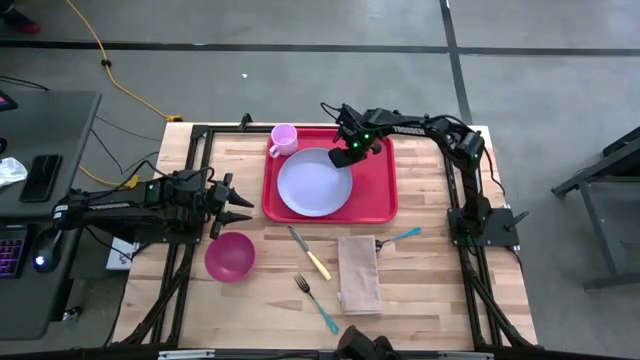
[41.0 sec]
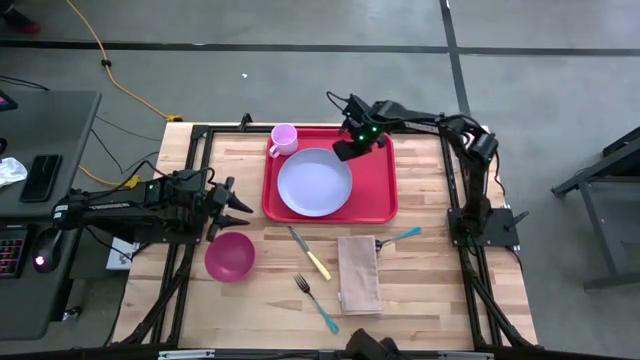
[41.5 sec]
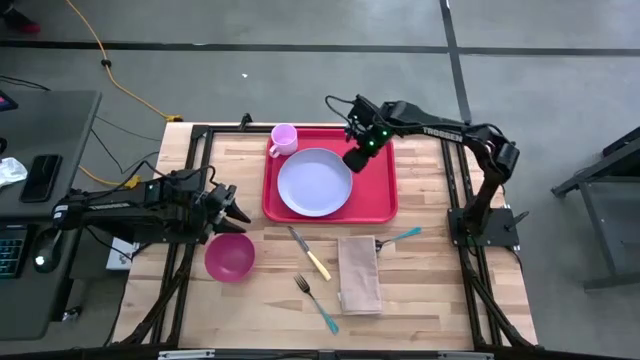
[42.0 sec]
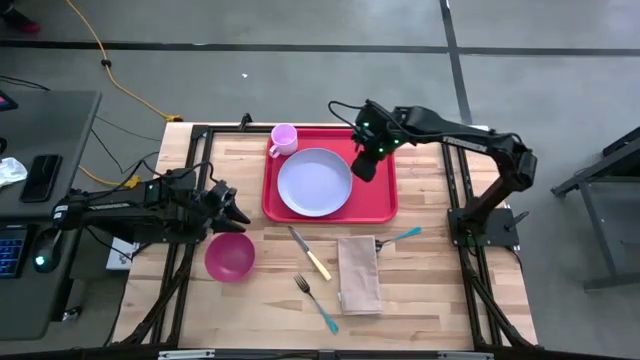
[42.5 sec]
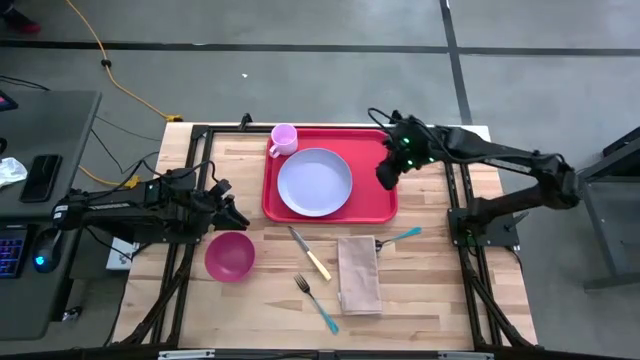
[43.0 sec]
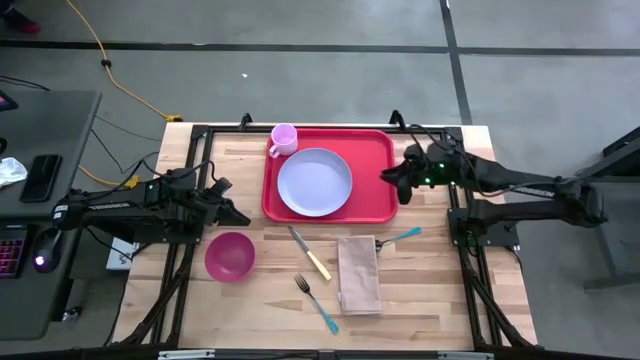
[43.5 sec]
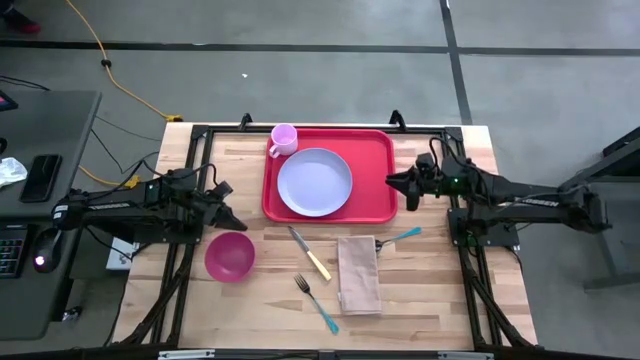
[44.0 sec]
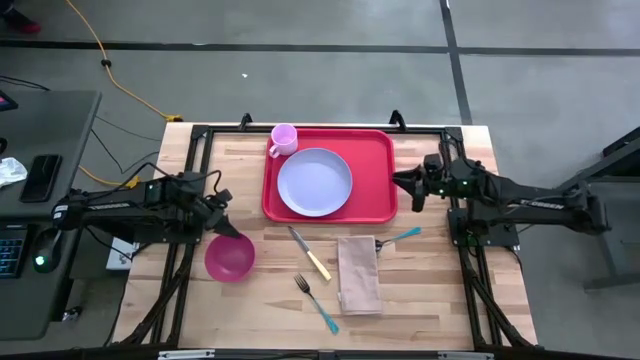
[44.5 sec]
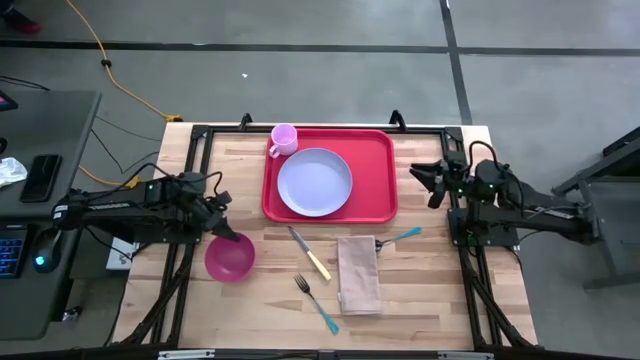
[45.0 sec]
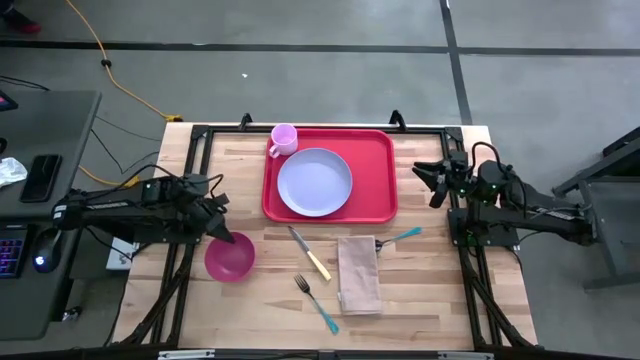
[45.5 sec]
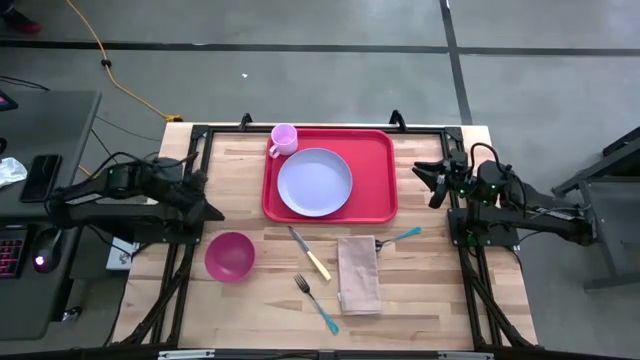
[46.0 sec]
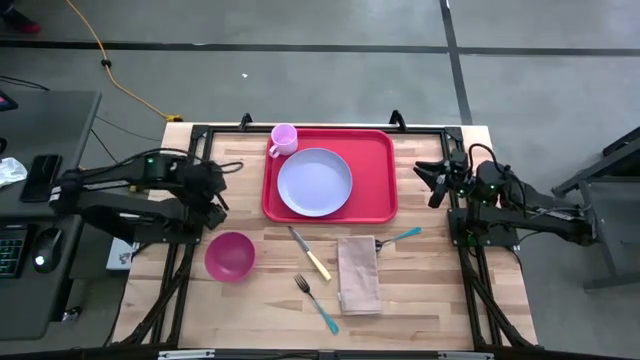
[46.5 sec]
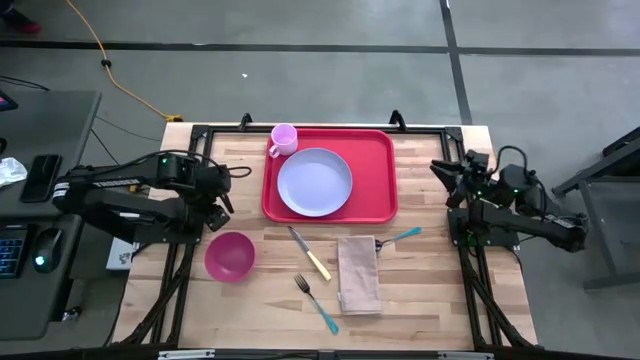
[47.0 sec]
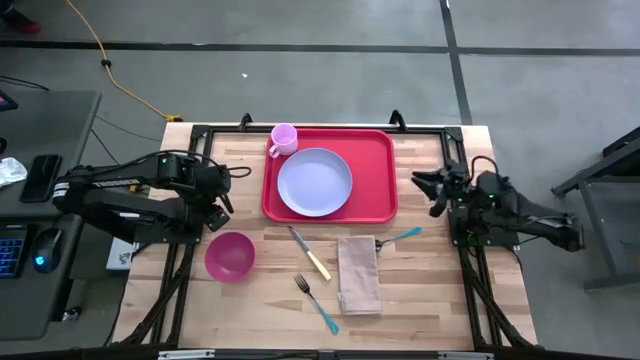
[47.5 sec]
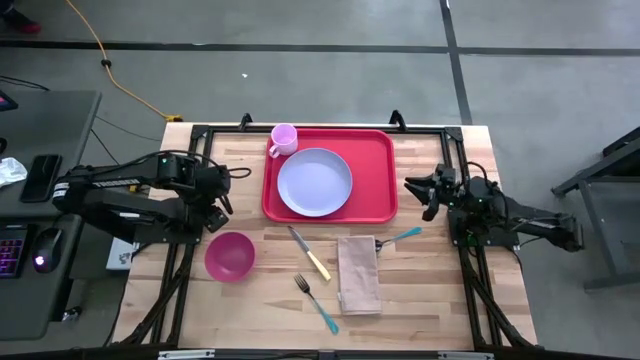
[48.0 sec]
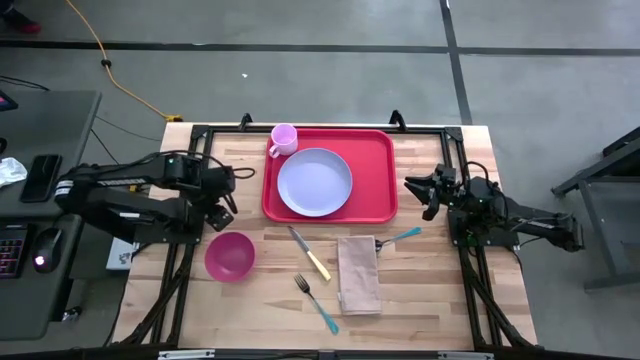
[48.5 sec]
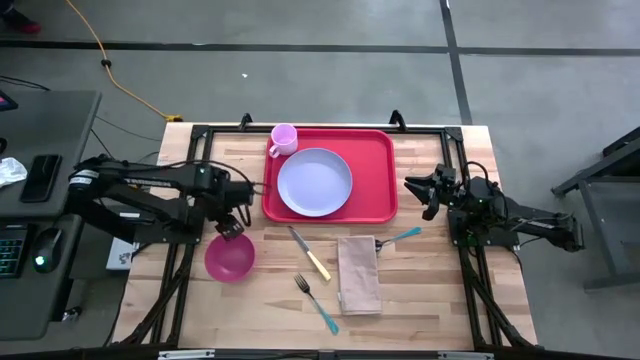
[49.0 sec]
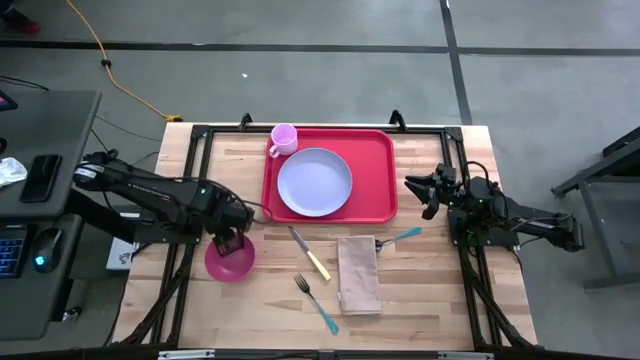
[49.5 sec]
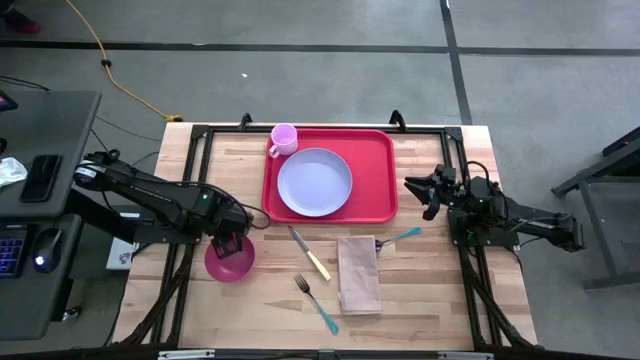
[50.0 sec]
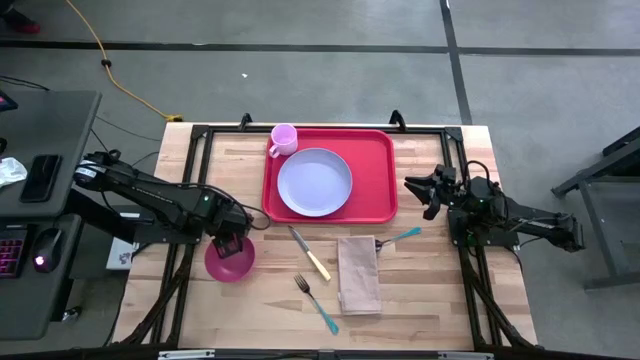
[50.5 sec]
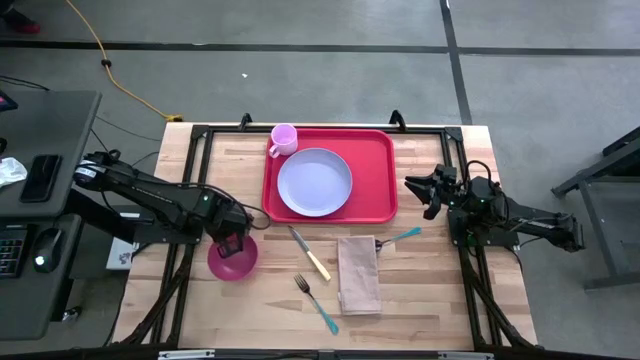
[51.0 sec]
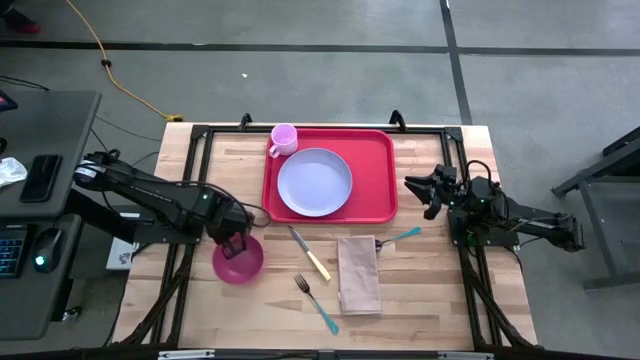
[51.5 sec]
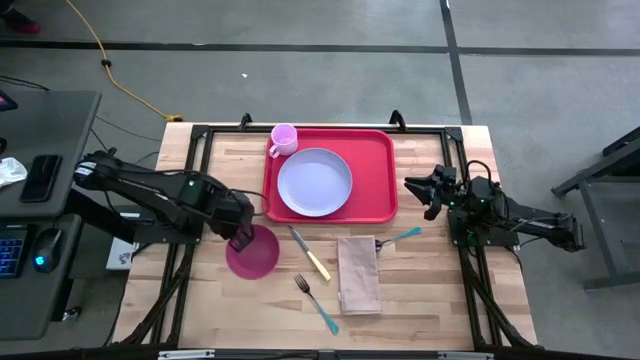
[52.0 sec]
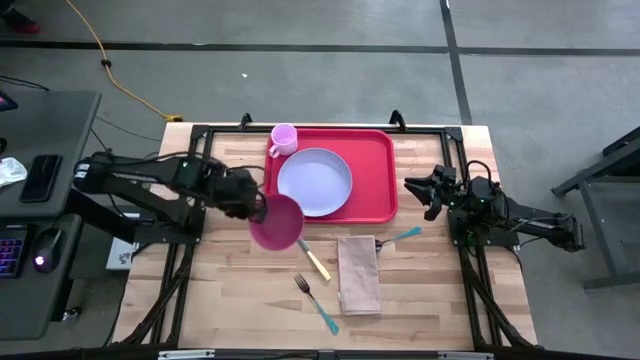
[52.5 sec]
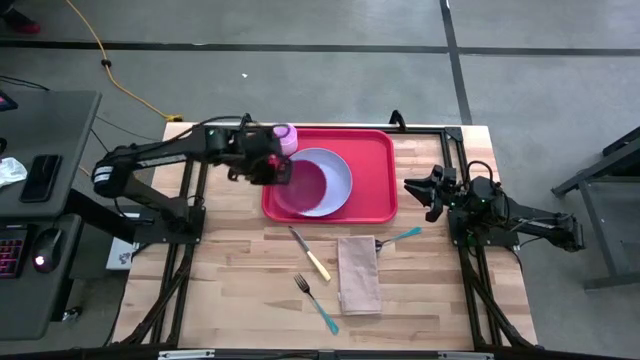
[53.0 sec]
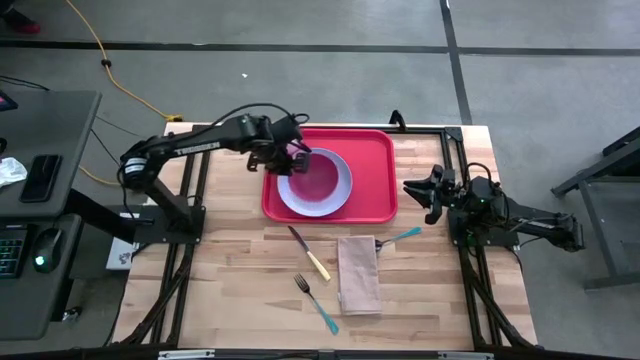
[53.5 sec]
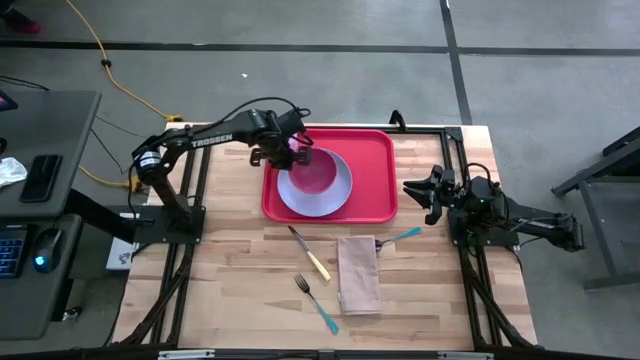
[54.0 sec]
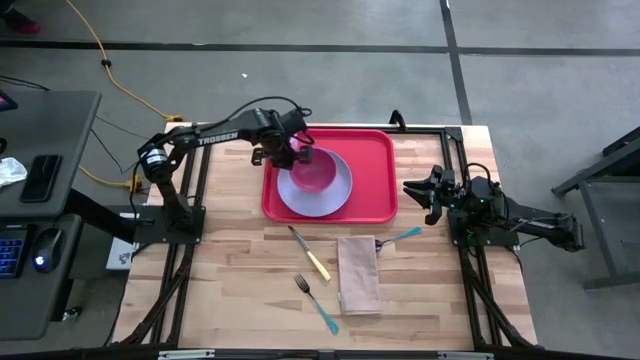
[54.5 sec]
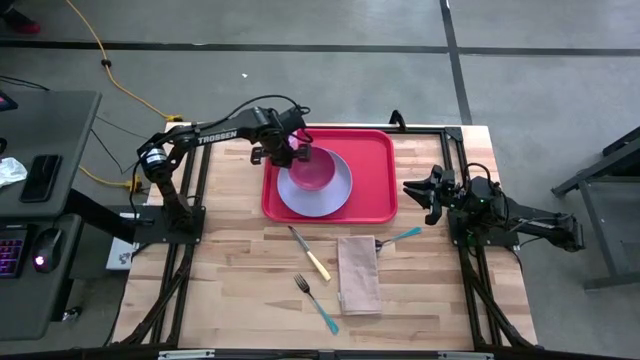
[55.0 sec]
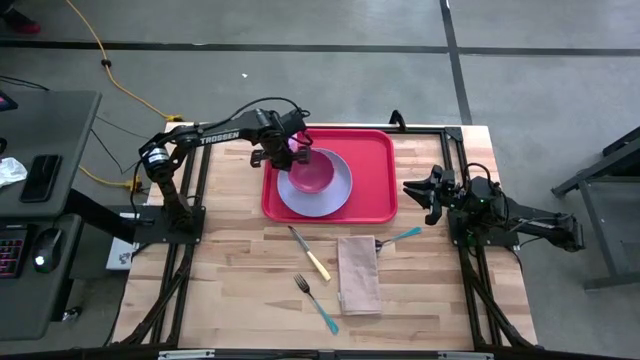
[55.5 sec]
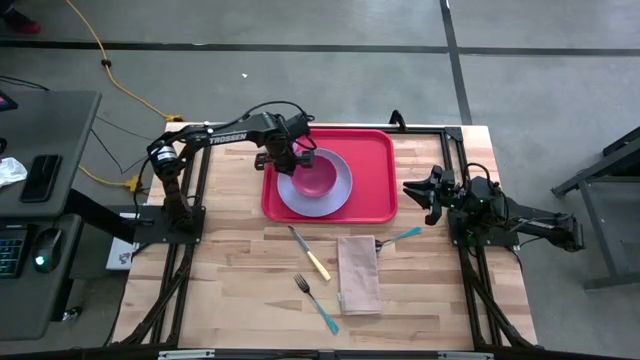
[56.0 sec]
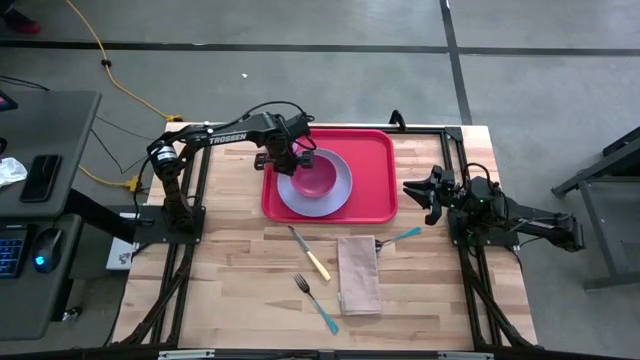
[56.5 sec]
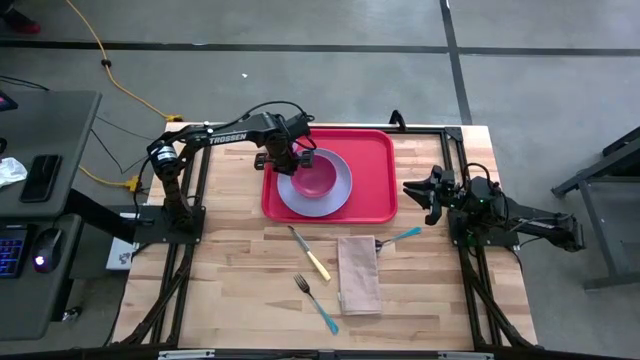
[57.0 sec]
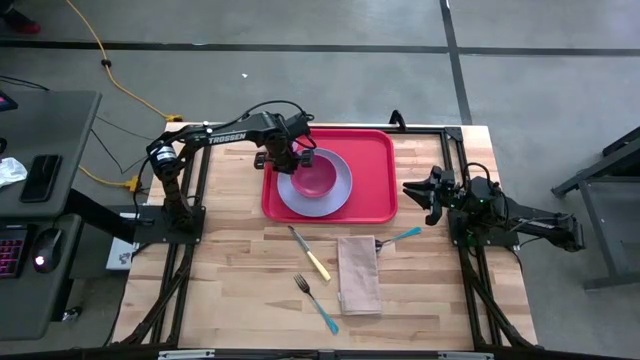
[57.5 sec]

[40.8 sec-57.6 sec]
Task: Set up tray
Put the pink bowl on top of the light blue plate on the orange serving tray

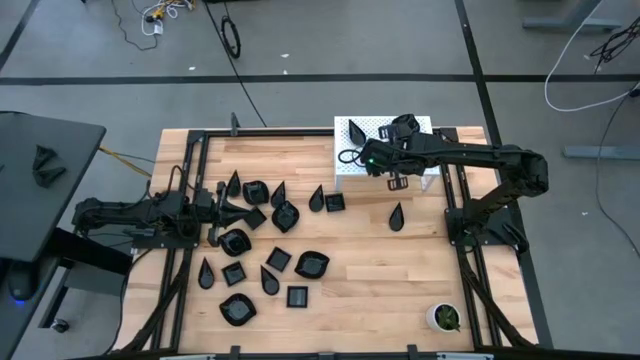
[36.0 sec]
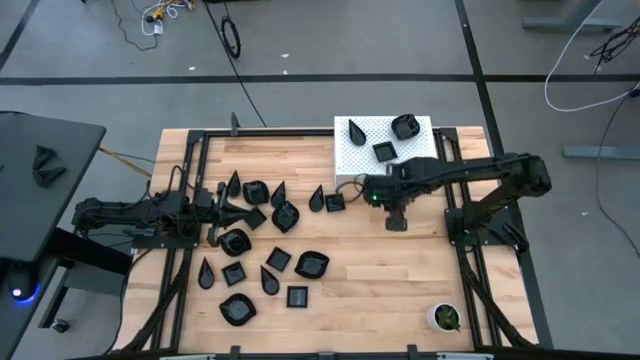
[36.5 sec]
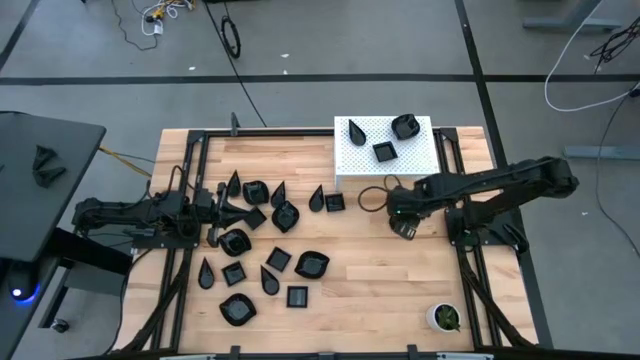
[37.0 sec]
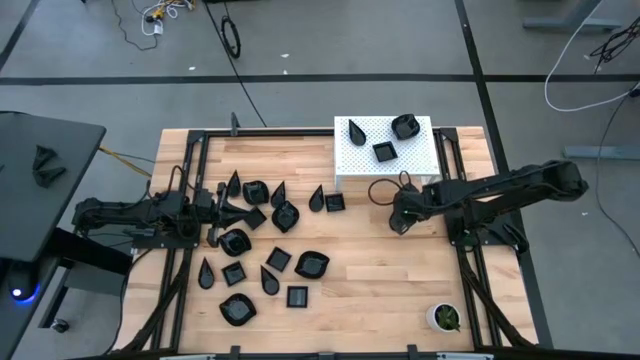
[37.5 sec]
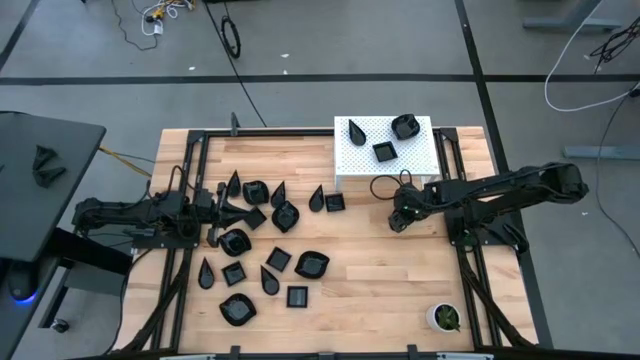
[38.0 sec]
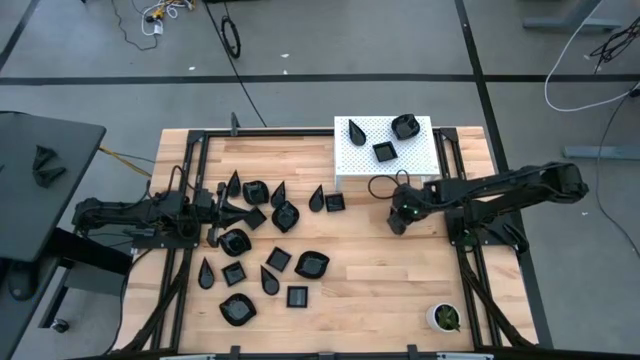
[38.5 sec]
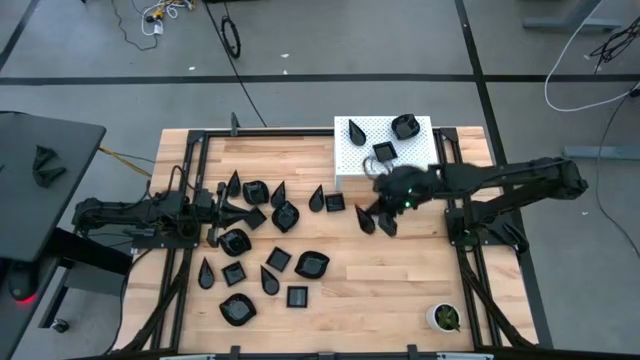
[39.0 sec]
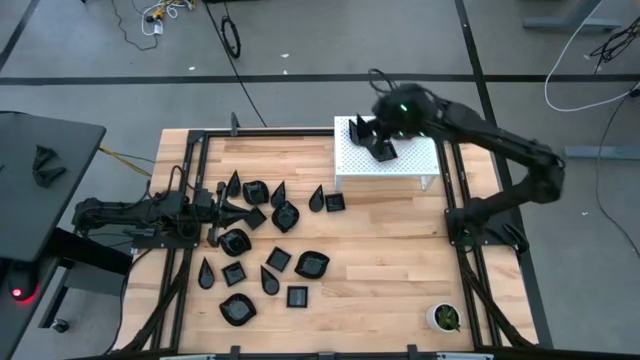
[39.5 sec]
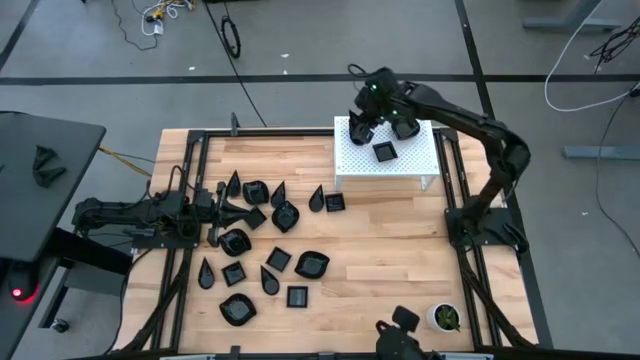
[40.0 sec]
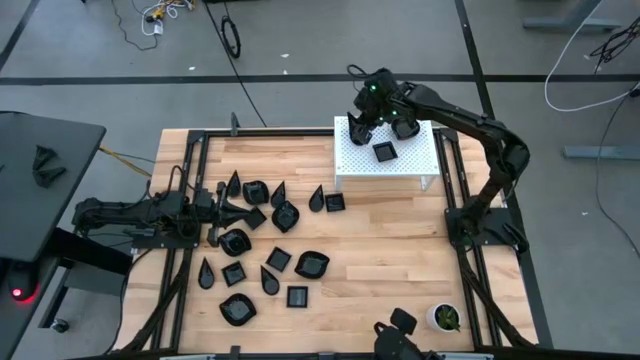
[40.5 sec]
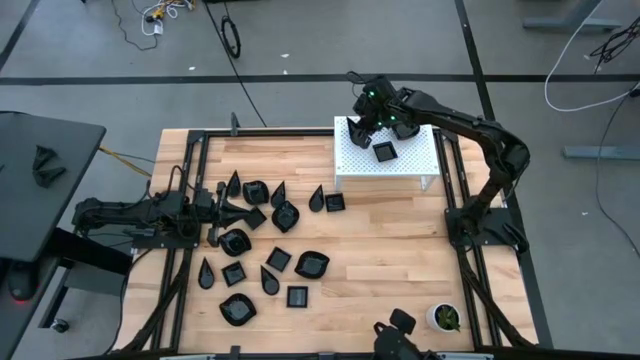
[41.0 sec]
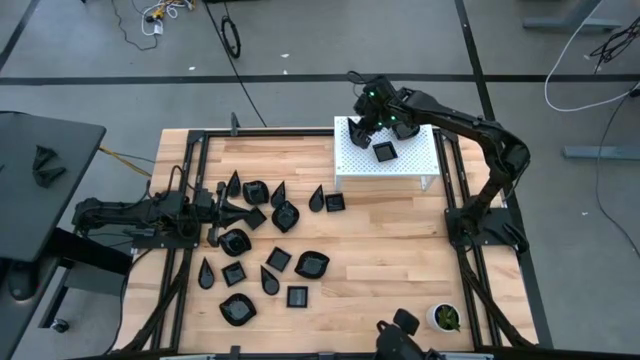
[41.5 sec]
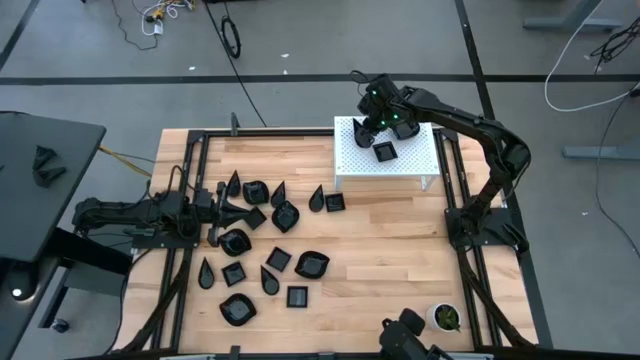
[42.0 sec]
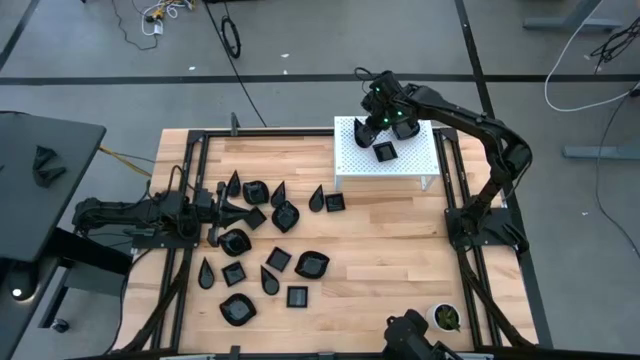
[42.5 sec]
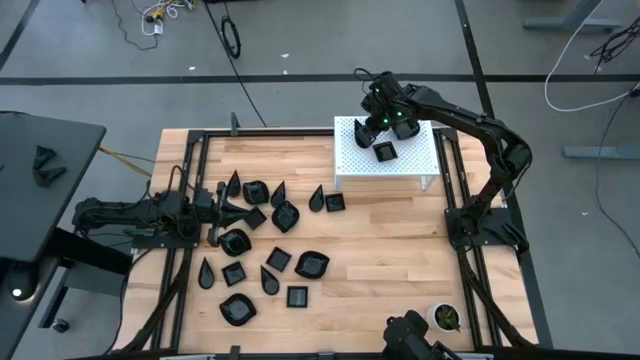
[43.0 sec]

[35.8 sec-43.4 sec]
Task: Pick & Place Mini shaped plates
Stack the black drop shaped plate on the black drop shaped plate on the shelf
